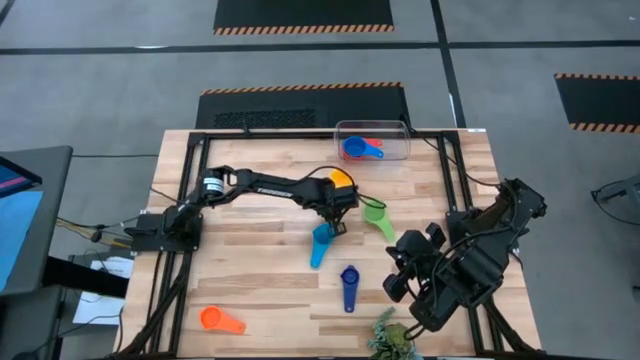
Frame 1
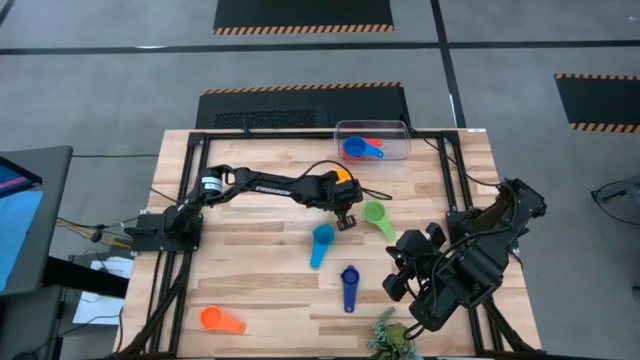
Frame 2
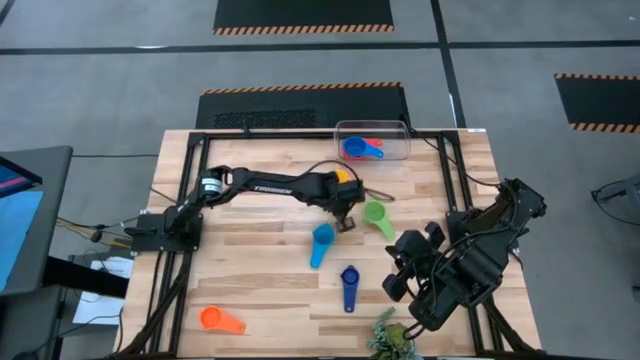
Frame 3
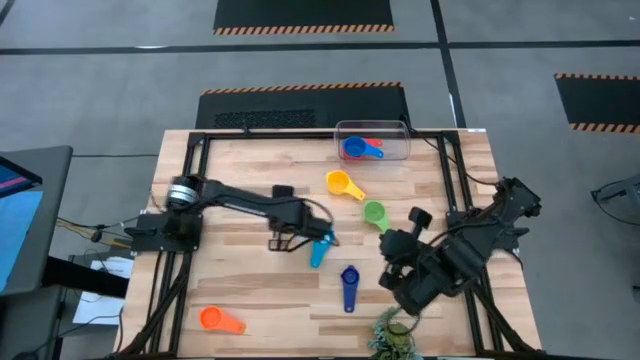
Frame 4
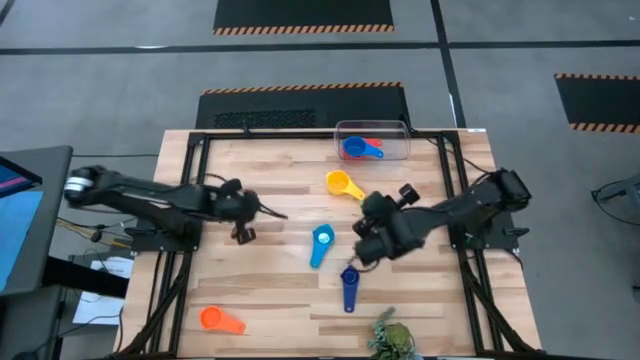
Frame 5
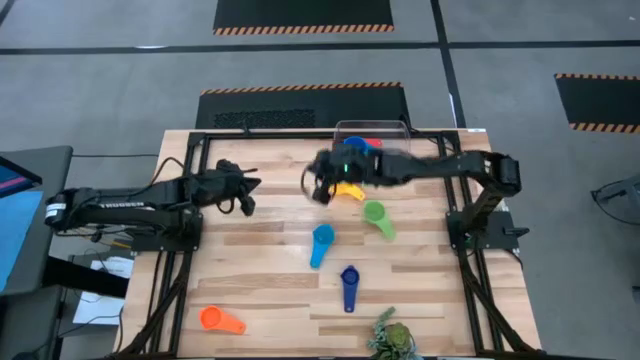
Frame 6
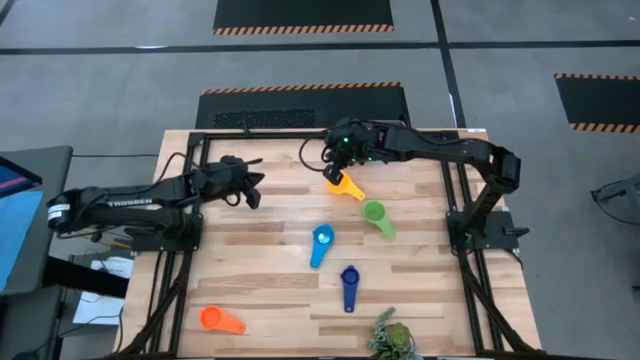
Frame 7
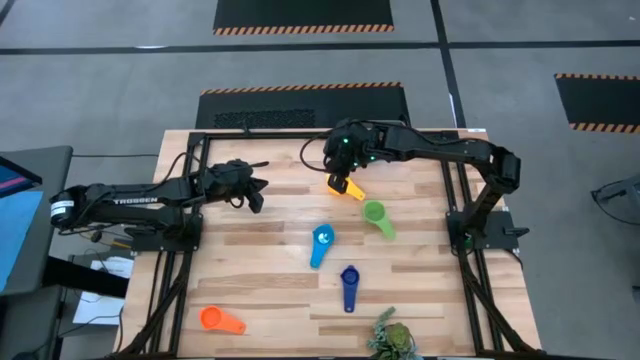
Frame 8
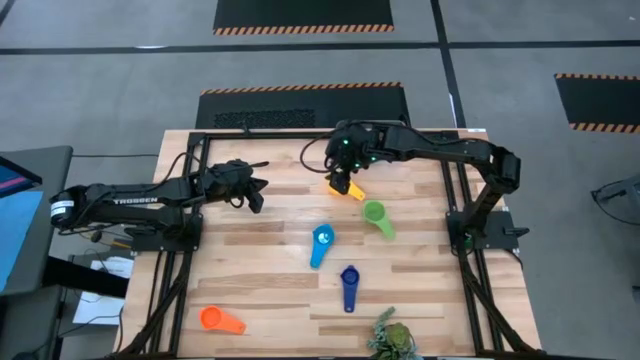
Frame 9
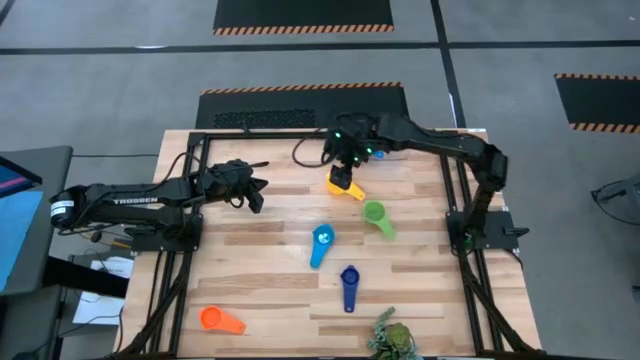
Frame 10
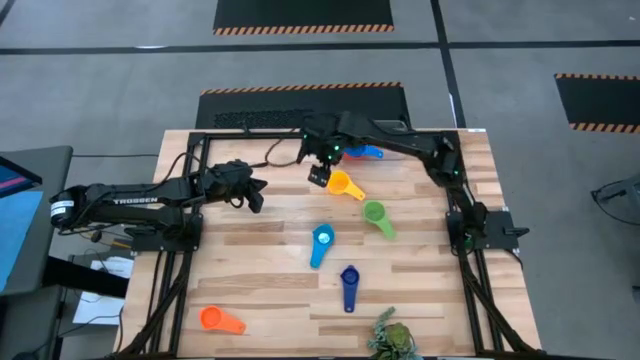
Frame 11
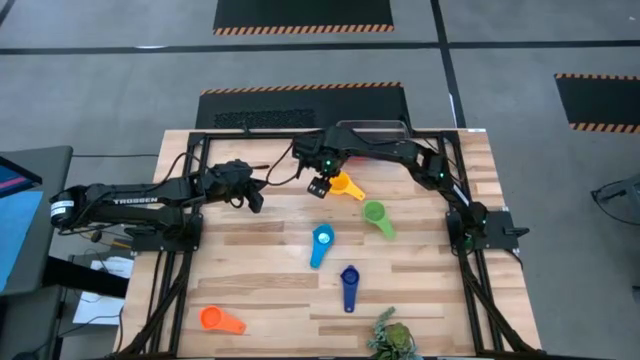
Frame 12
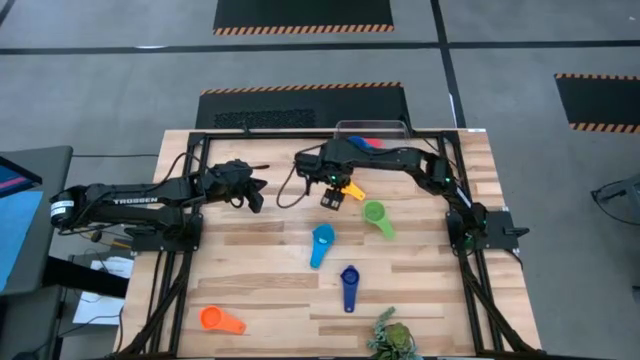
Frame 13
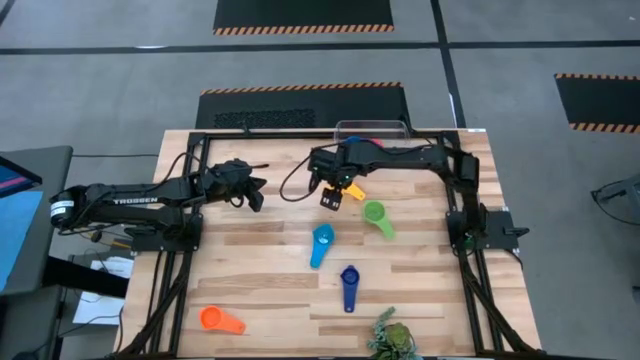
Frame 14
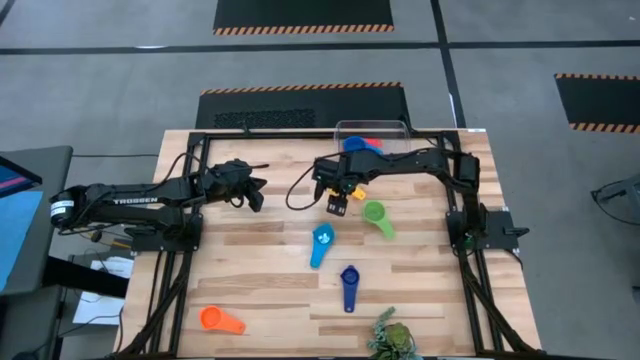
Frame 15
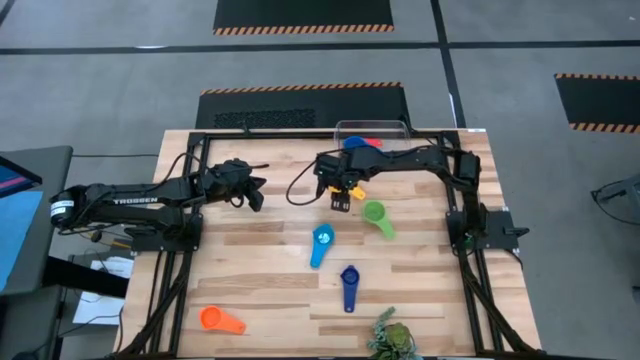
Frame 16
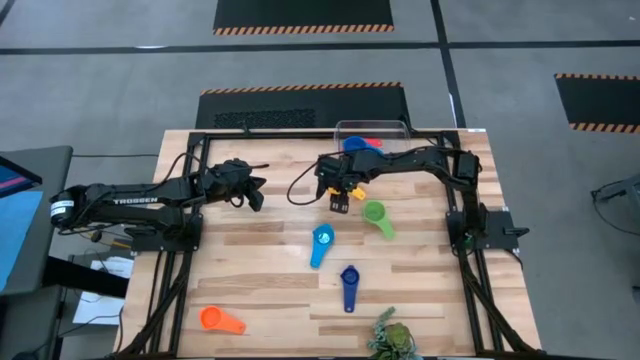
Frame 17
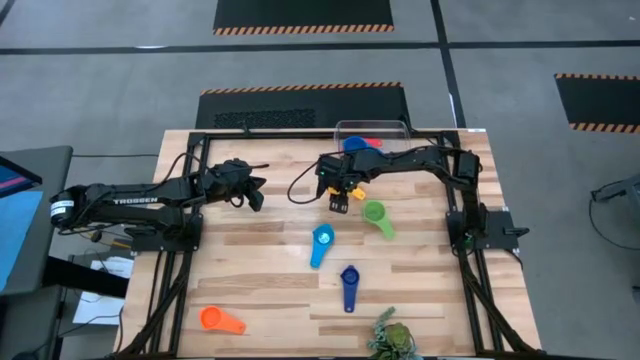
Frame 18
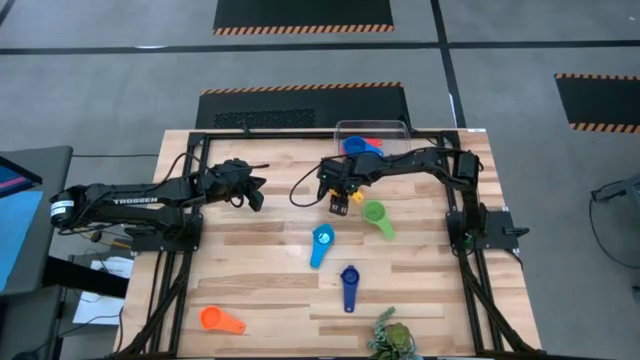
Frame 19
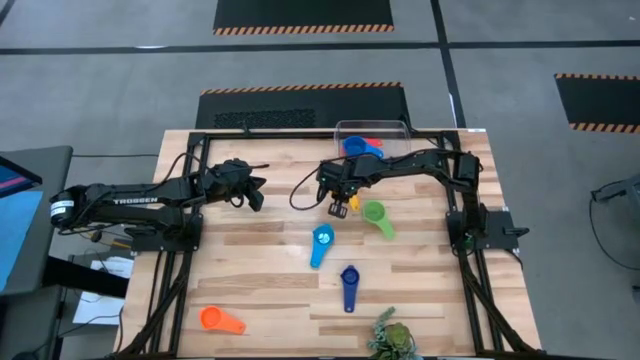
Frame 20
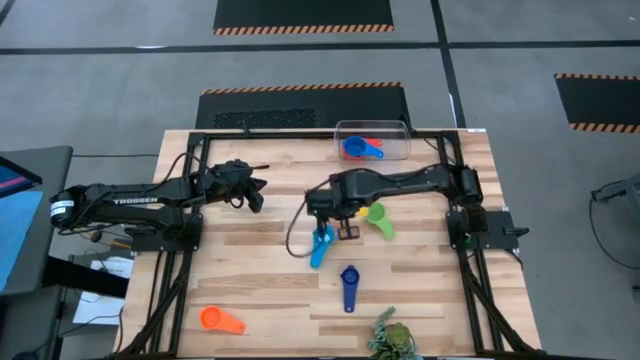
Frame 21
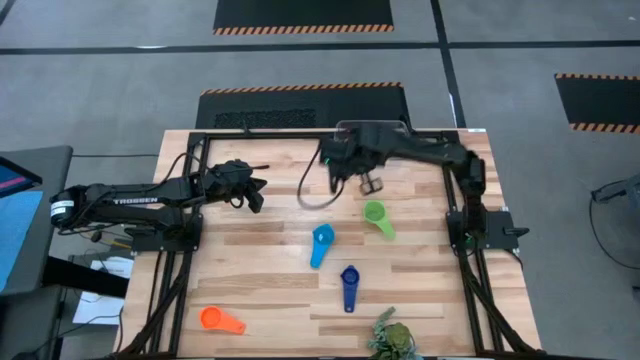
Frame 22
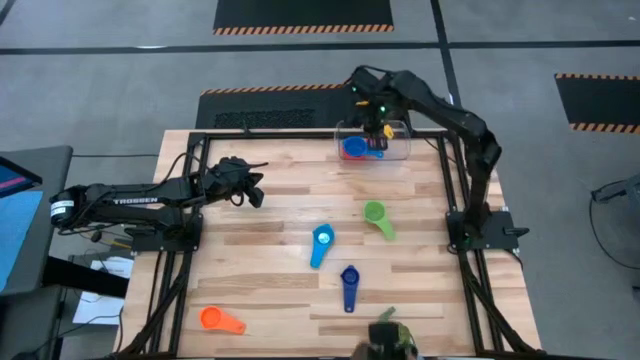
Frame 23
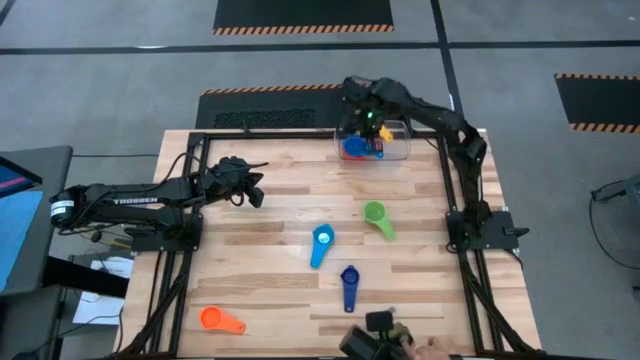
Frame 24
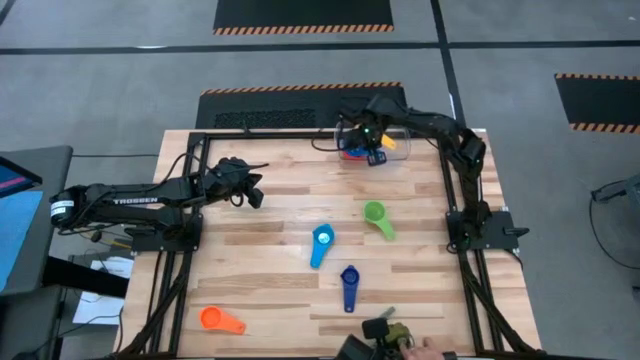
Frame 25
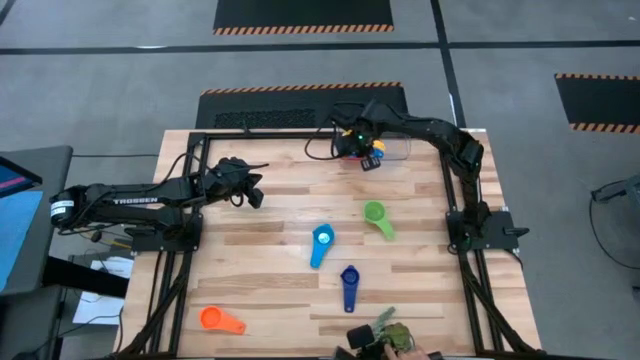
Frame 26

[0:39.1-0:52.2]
Task: Nest measuring cups in basket
Stack the yellow measuring cup on top of the blue measuring cup in the transparent bin

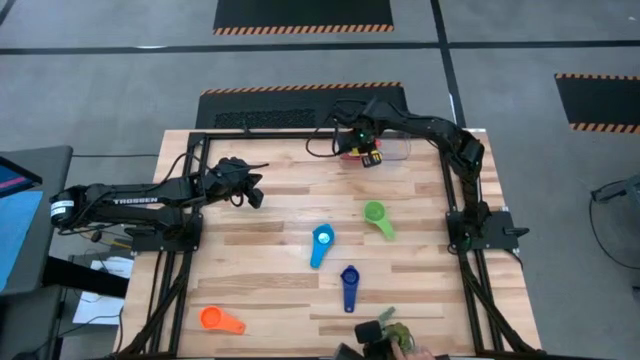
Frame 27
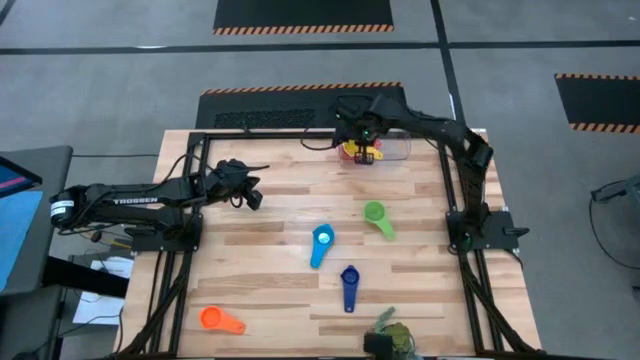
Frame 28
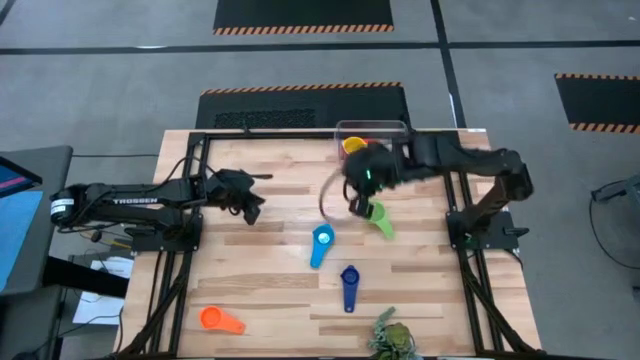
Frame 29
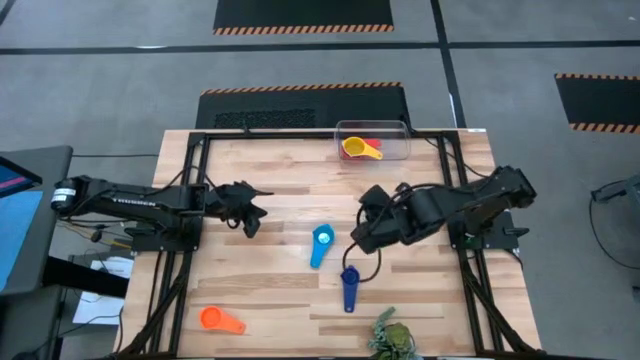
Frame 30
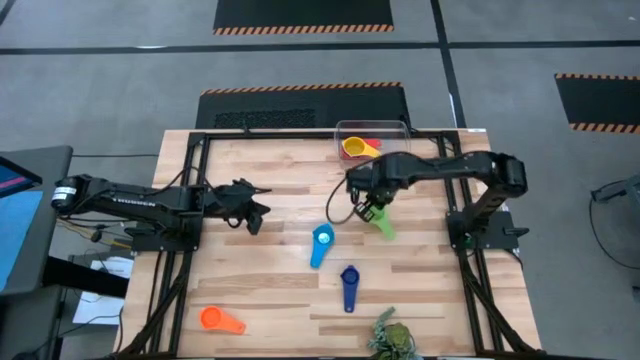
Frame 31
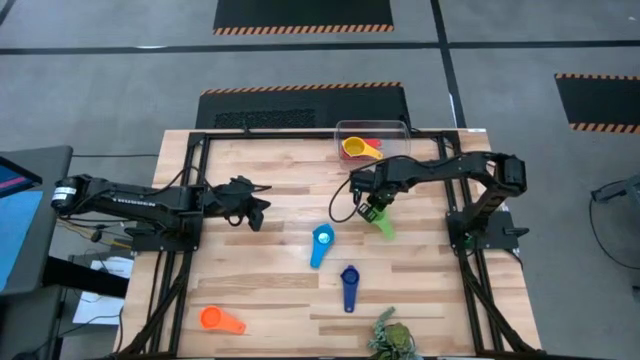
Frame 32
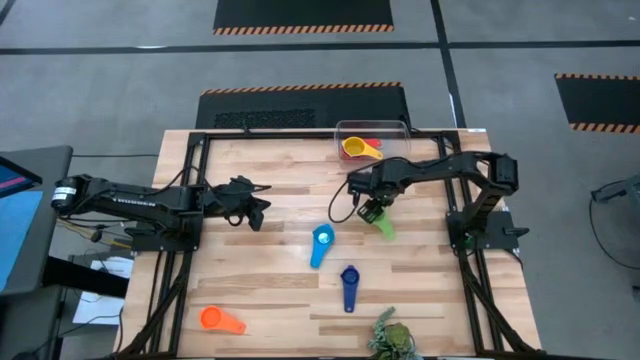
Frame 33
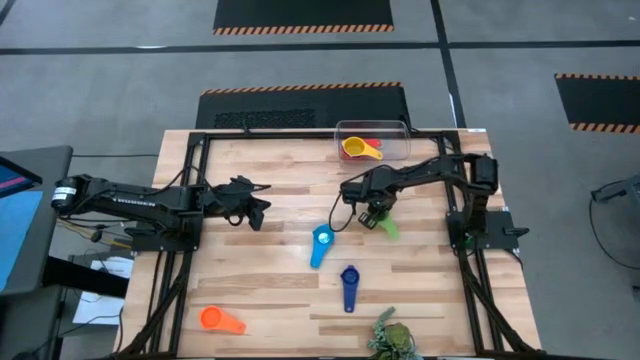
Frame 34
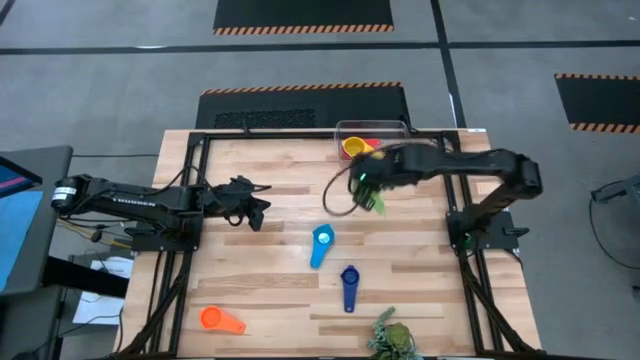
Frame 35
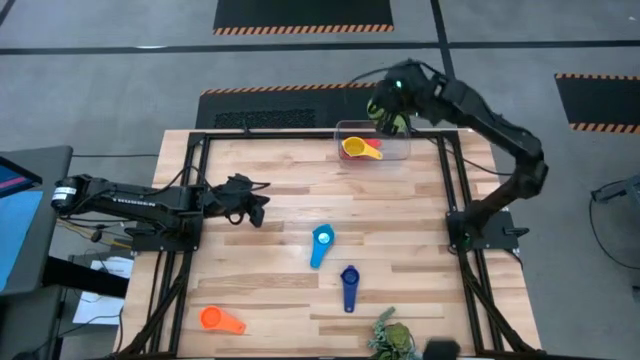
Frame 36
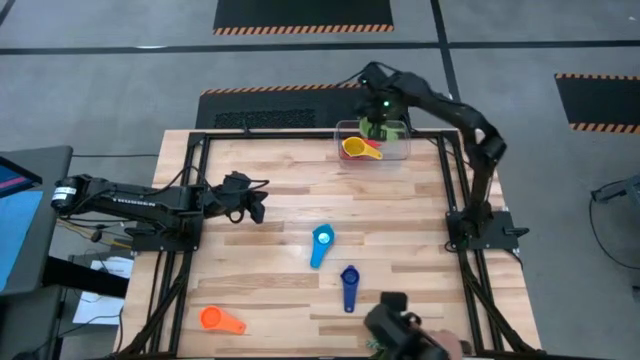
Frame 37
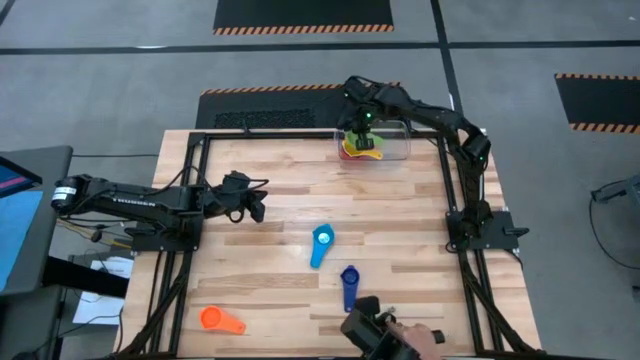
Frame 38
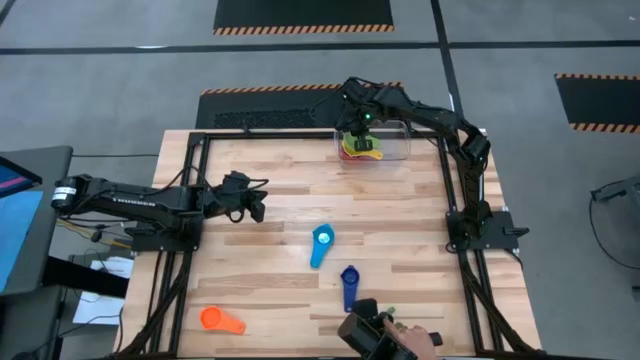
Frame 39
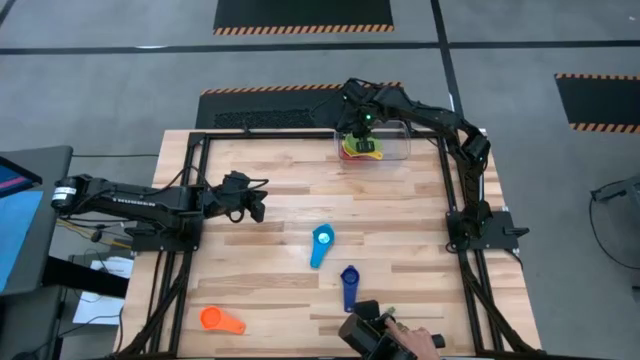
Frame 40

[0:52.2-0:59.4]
Stack the green measuring cup on top of the yellow measuring cup in the transparent bin
